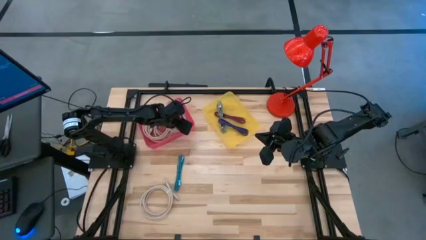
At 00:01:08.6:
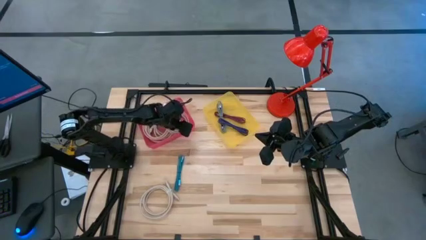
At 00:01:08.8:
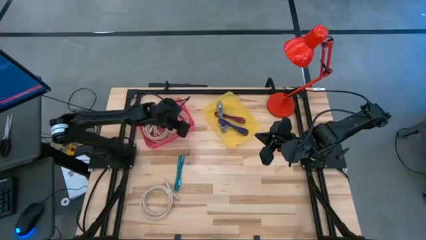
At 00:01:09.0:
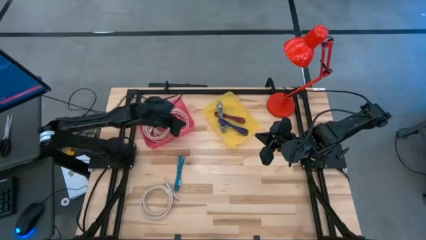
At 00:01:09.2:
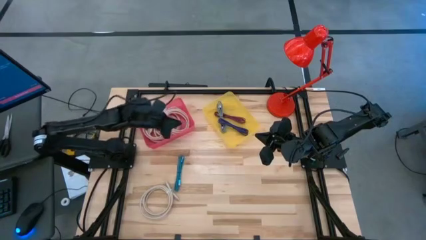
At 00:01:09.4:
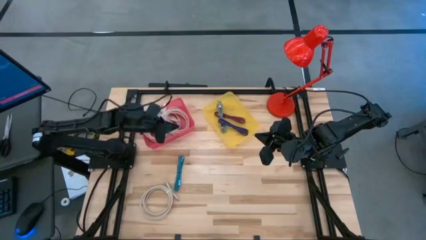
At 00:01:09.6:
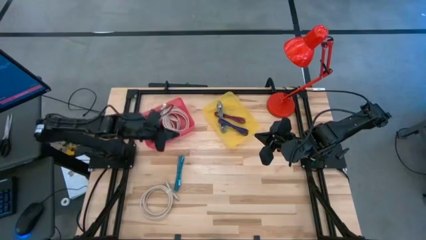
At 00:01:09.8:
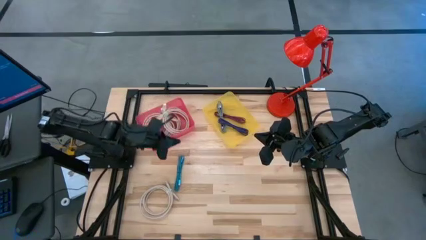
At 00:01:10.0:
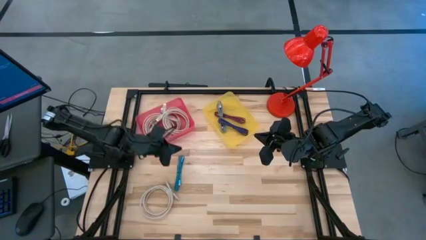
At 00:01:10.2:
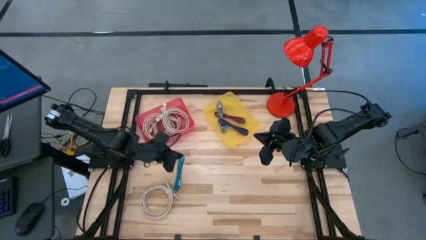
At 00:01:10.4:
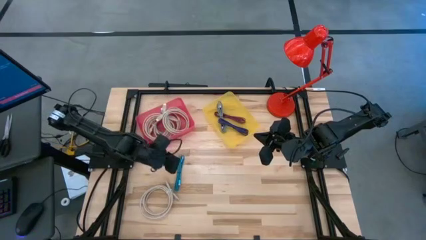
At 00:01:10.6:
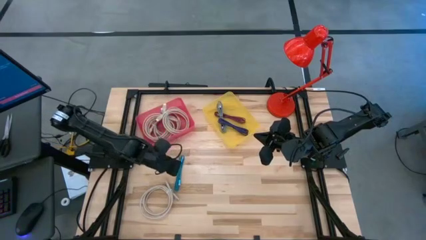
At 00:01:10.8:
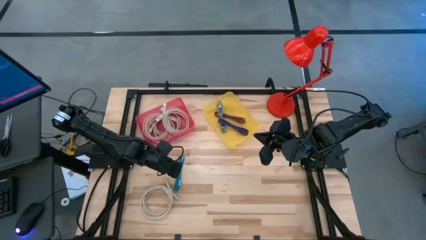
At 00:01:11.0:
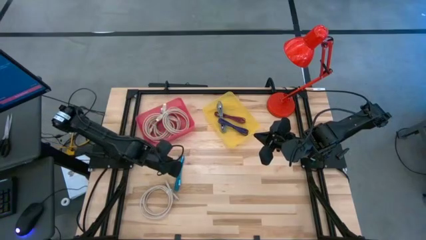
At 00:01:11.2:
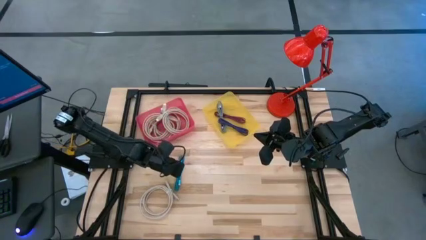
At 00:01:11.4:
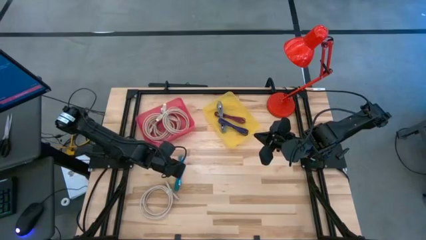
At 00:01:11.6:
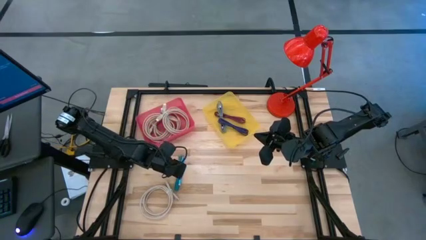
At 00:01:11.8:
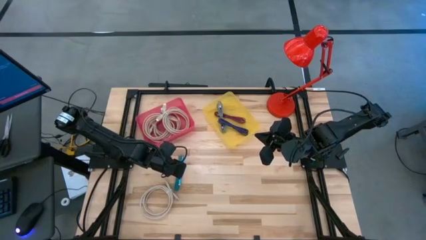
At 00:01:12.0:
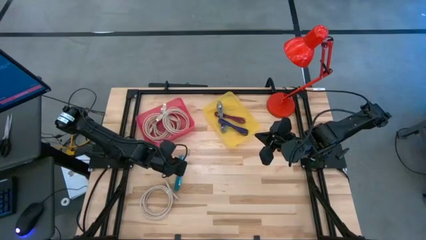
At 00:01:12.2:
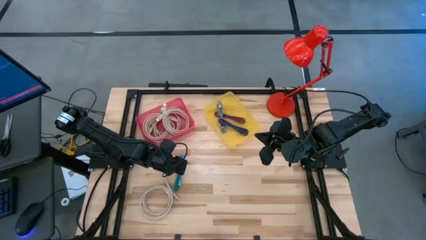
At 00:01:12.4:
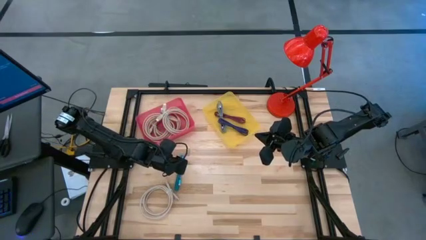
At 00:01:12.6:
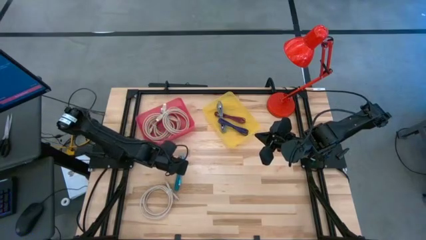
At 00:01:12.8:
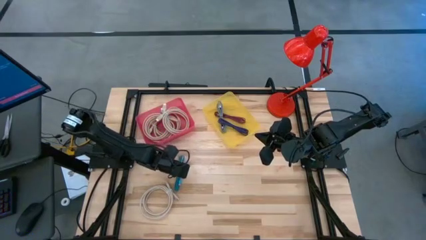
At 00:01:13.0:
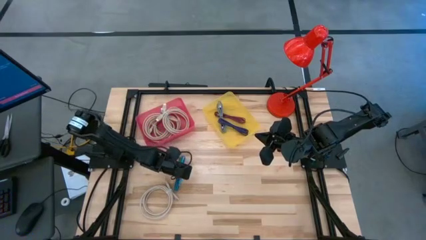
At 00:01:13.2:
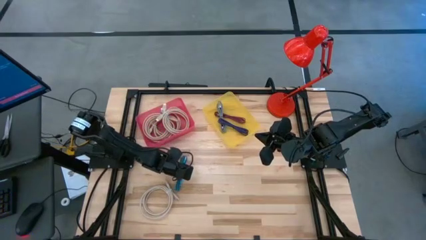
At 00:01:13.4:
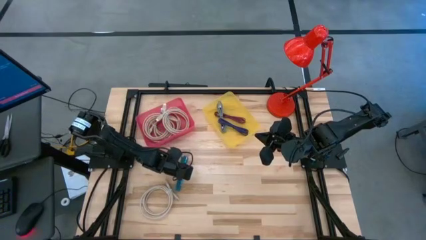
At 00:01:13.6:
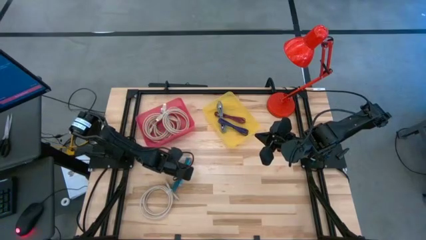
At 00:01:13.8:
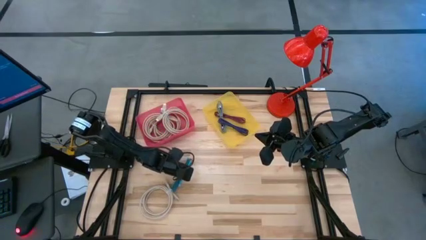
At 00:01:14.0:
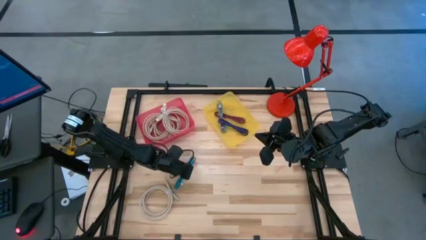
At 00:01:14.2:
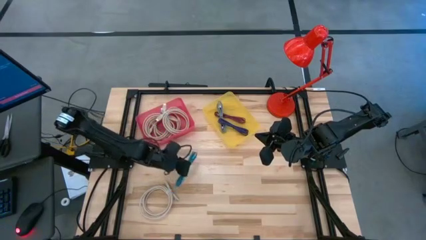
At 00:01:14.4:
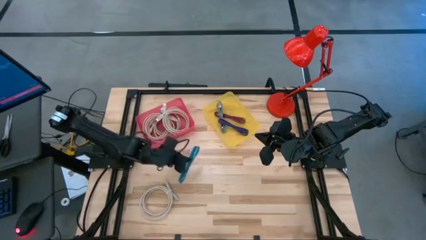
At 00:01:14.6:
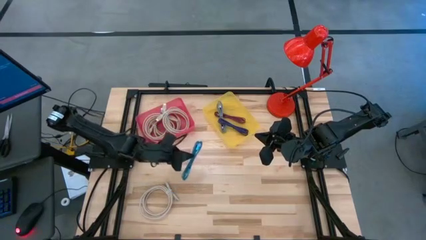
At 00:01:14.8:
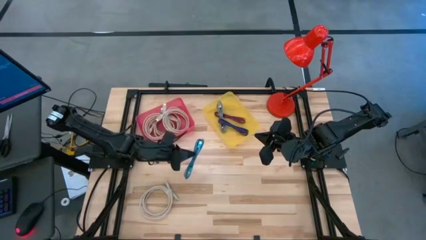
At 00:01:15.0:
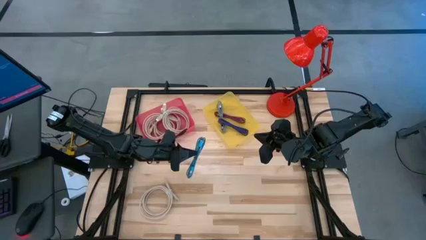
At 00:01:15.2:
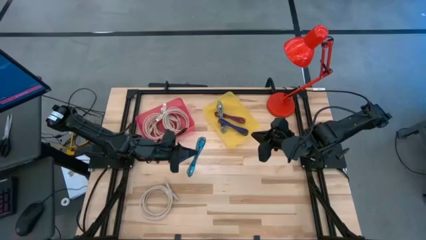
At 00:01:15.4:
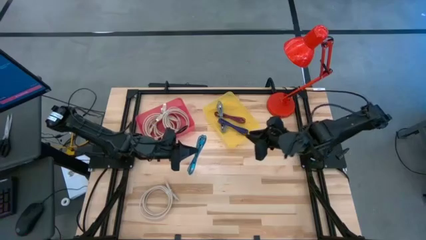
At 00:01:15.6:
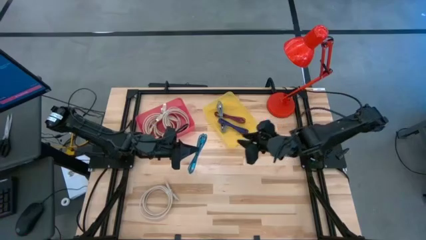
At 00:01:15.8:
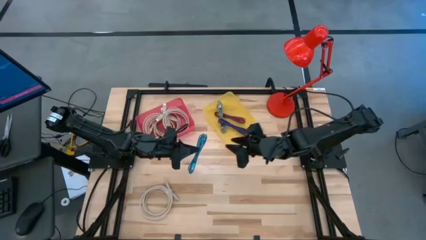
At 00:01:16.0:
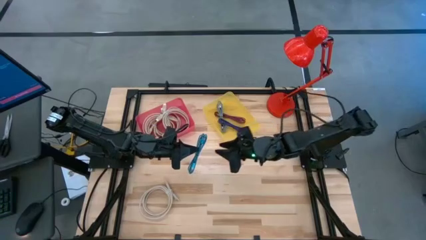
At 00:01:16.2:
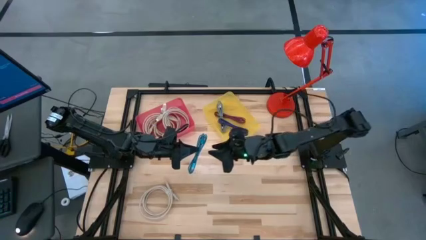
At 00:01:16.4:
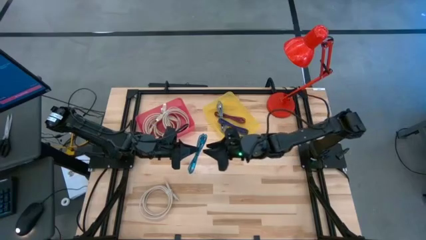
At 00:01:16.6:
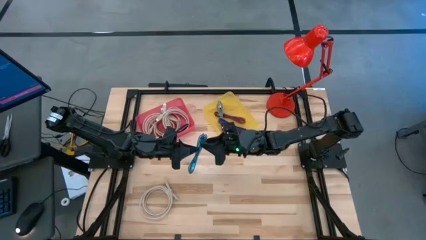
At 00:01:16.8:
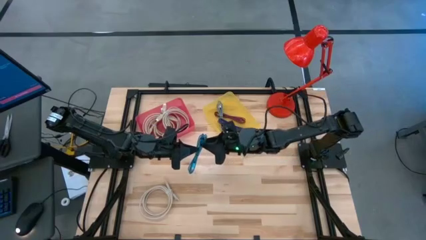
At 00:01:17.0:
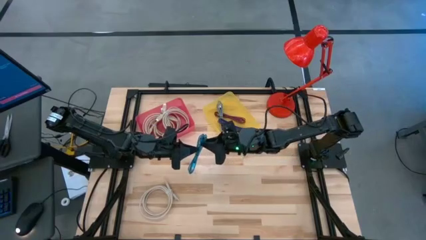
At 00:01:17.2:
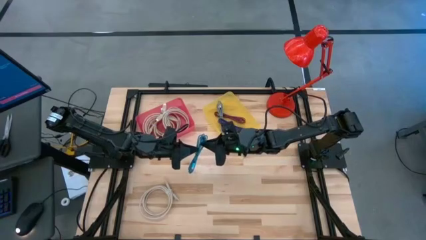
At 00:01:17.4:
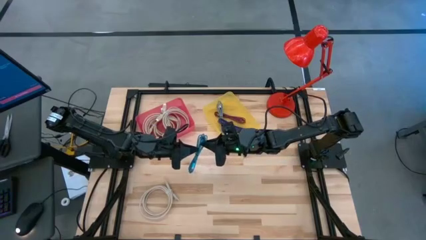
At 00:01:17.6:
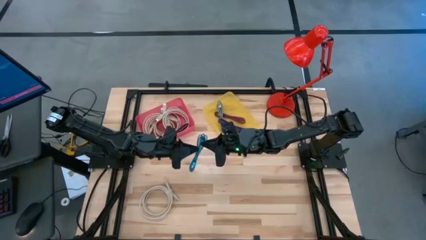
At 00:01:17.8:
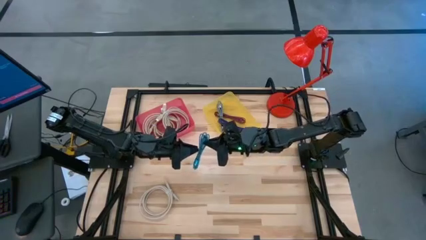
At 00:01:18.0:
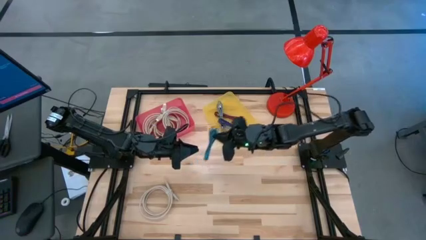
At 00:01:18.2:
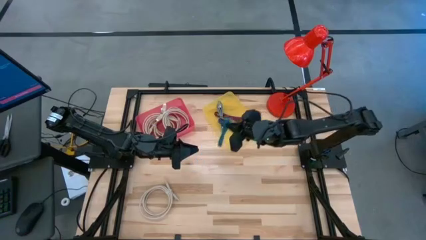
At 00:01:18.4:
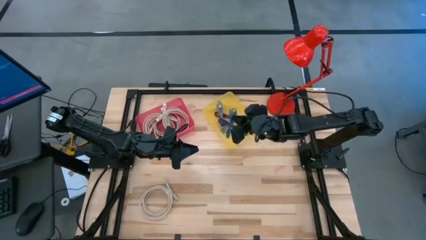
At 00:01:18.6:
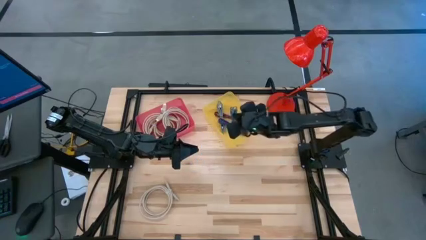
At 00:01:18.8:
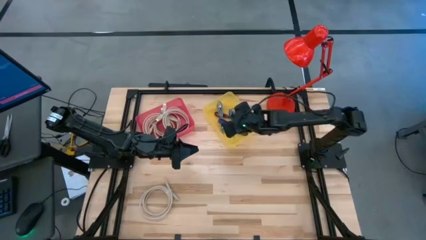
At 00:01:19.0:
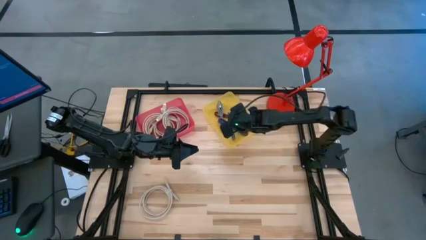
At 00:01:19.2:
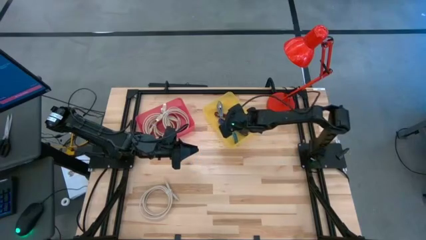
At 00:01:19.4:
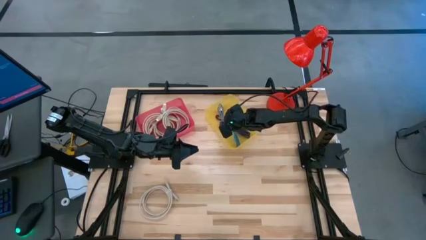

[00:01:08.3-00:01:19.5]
Task: Pick & Place USB Port
Put the light blue charger cable into the yellow transparent bin

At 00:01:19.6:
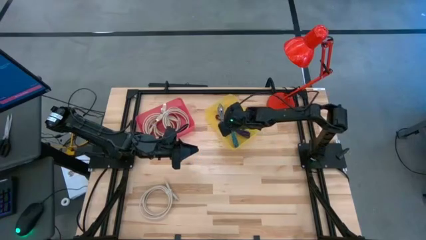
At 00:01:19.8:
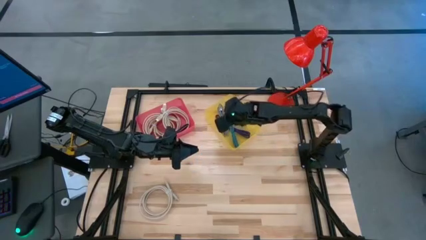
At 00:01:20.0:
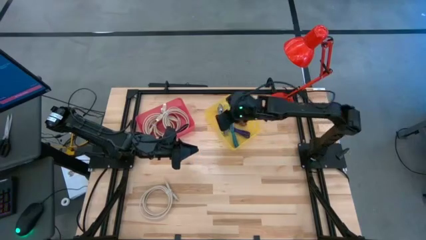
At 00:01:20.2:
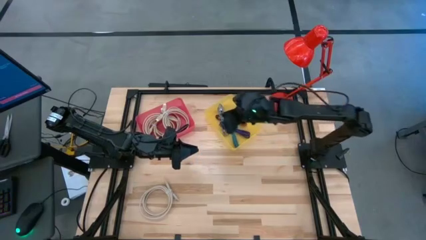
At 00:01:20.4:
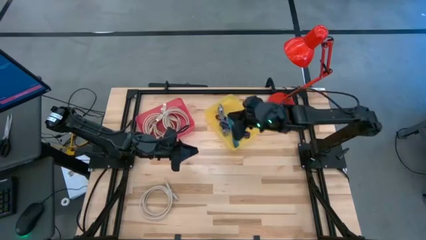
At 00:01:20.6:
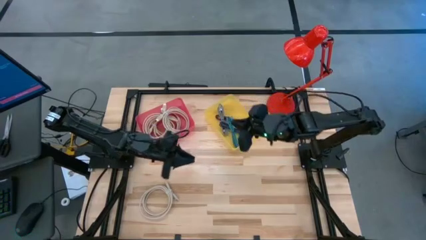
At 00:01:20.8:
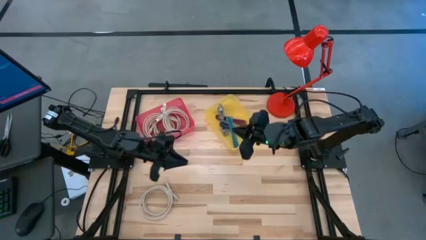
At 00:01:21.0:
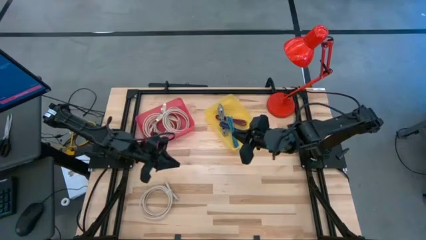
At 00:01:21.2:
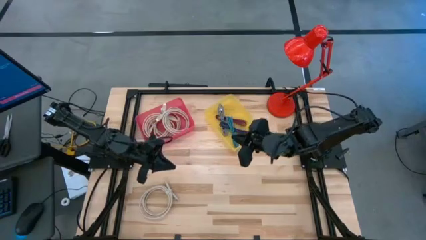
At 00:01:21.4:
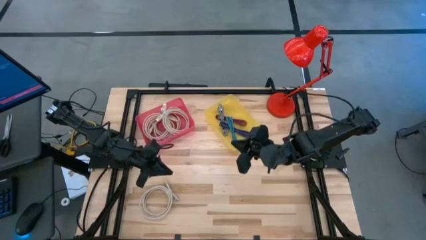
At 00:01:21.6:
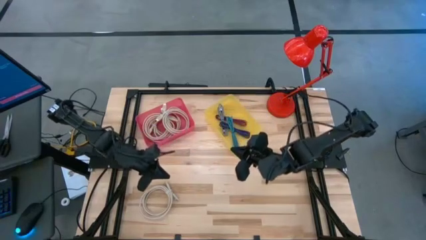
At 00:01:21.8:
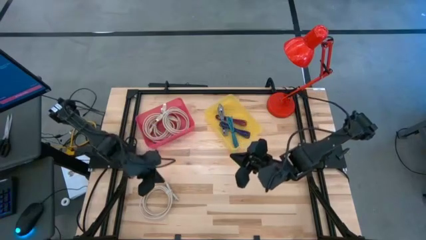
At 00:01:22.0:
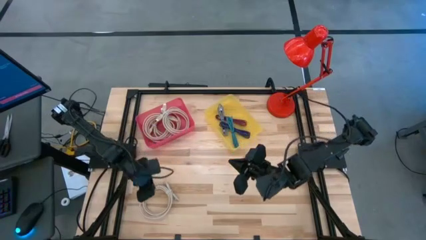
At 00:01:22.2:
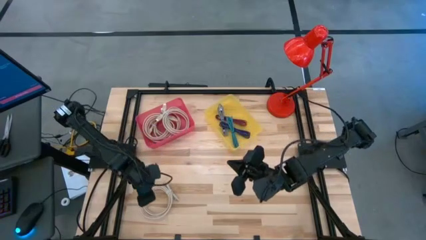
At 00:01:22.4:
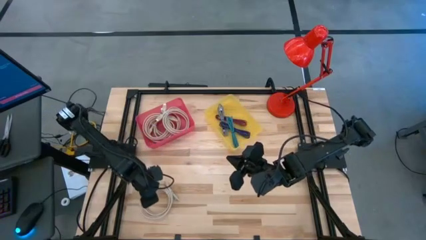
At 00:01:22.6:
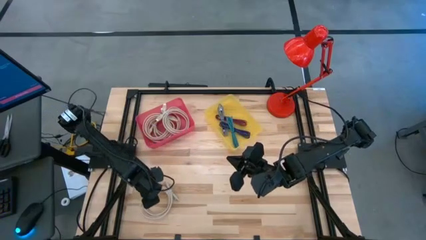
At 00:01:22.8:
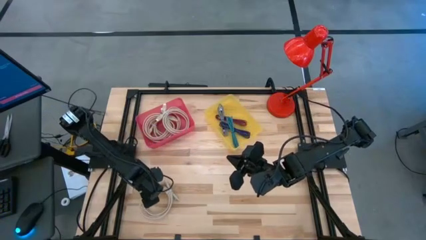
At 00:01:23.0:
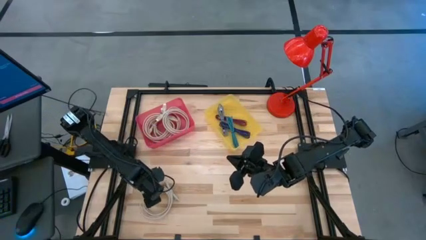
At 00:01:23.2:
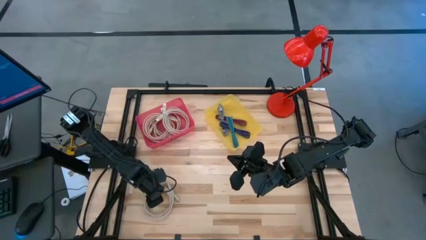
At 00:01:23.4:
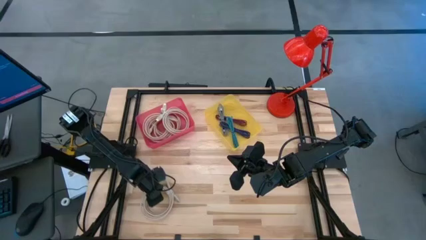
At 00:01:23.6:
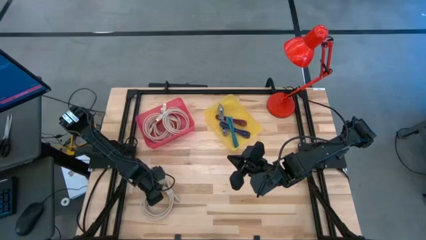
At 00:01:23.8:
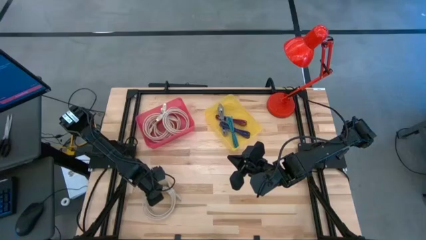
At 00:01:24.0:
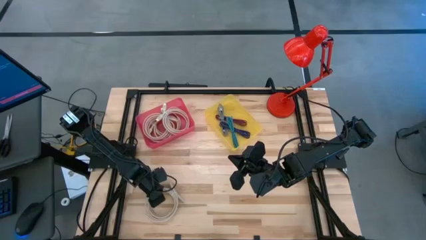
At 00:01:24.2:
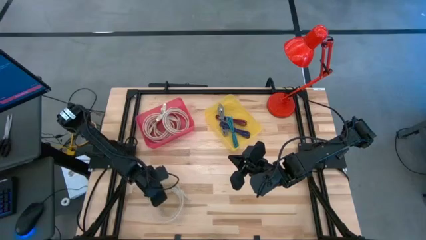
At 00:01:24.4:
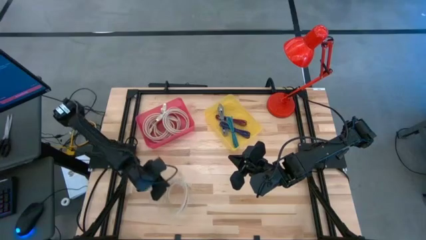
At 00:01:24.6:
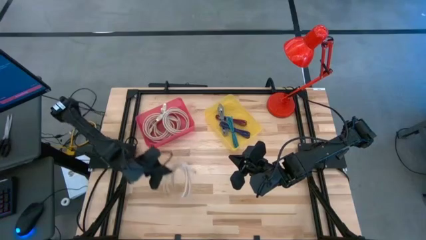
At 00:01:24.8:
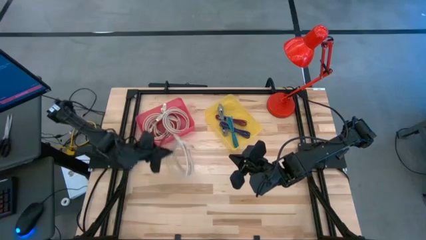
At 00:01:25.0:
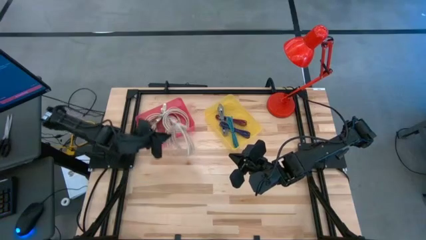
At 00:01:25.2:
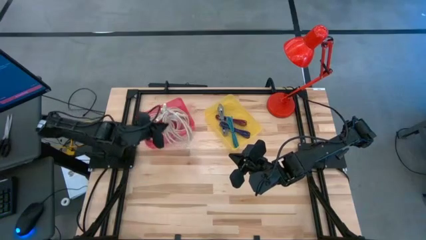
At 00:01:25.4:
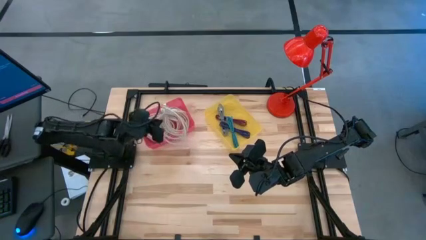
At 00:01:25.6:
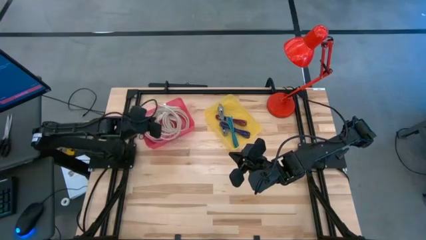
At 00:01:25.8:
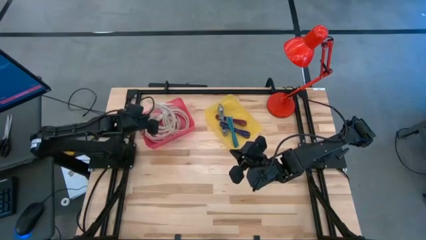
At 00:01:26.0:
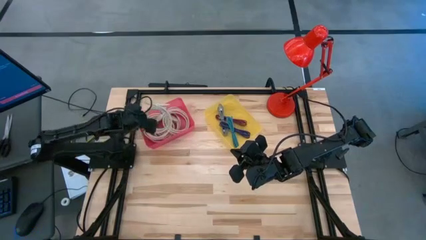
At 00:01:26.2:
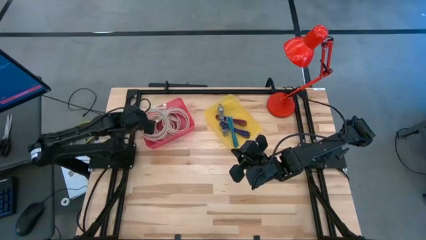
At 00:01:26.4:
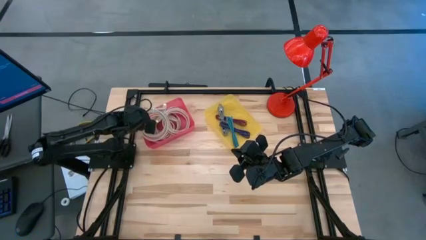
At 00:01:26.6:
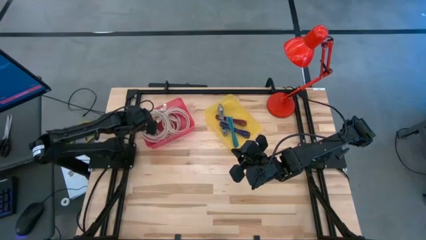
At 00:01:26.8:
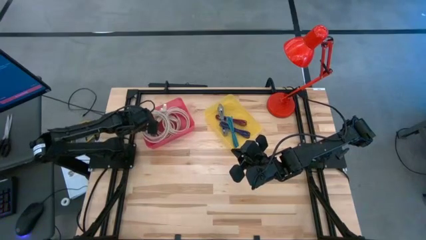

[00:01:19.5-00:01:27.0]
Put the white HDMI cable into the pink transparent bin
